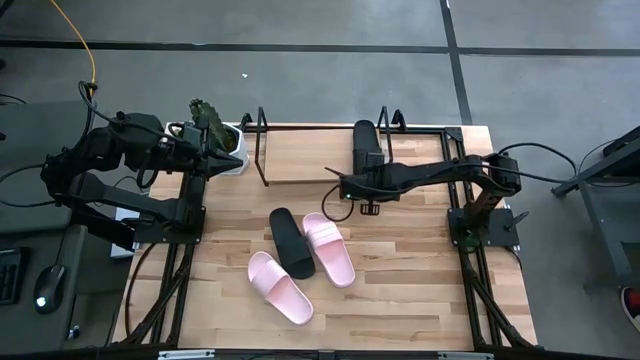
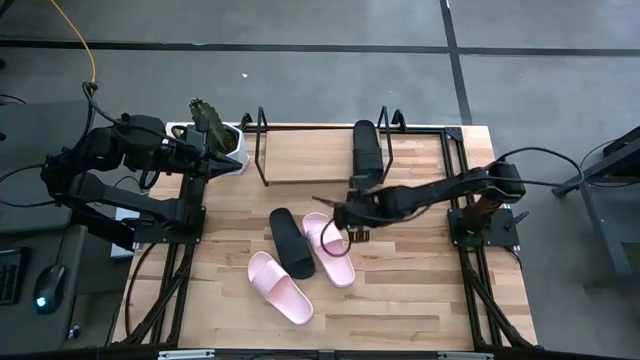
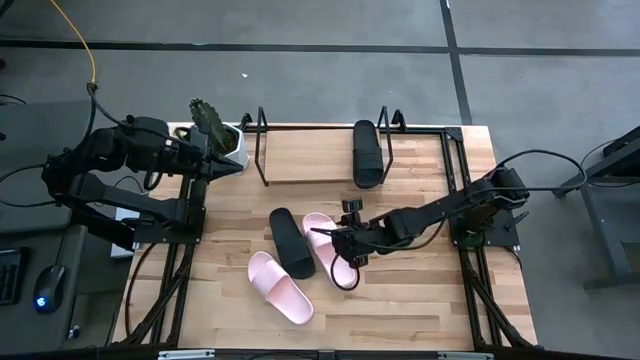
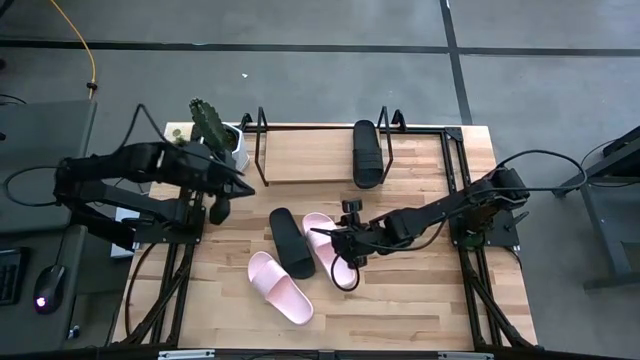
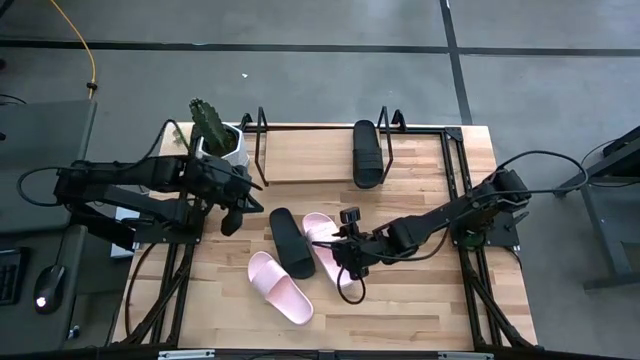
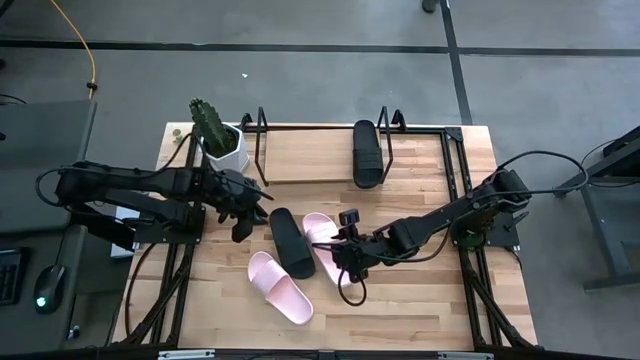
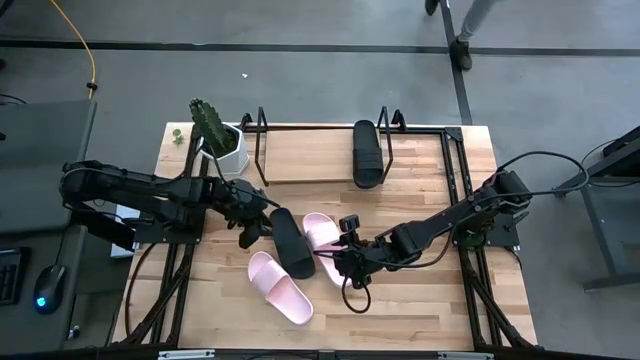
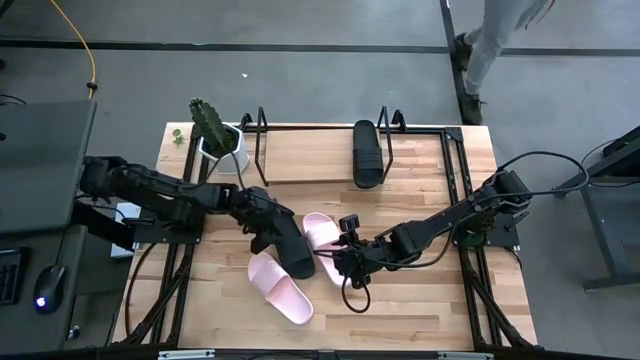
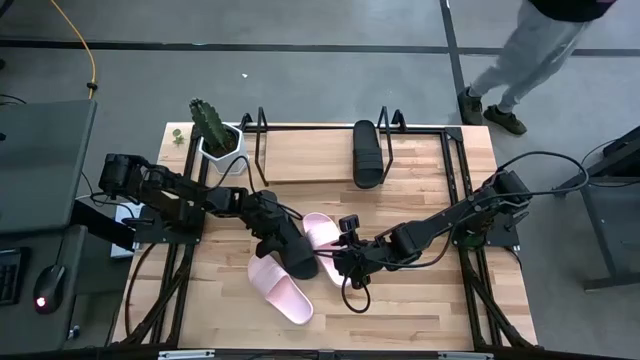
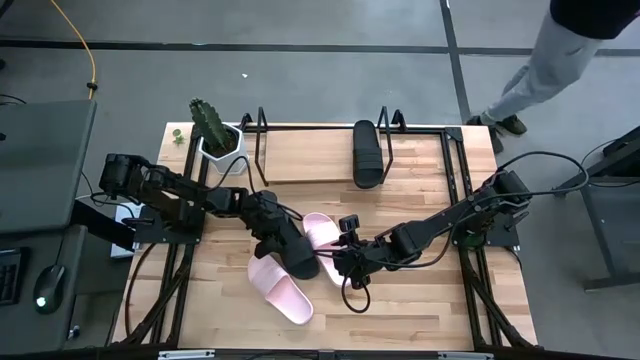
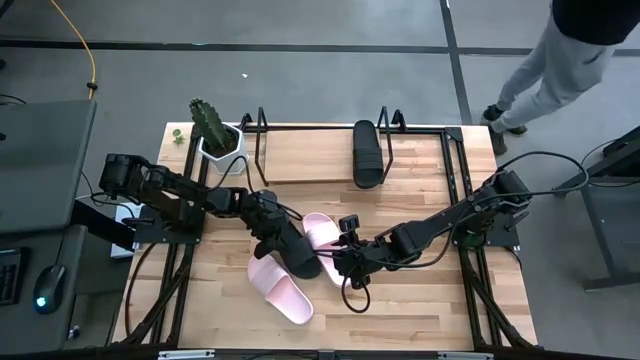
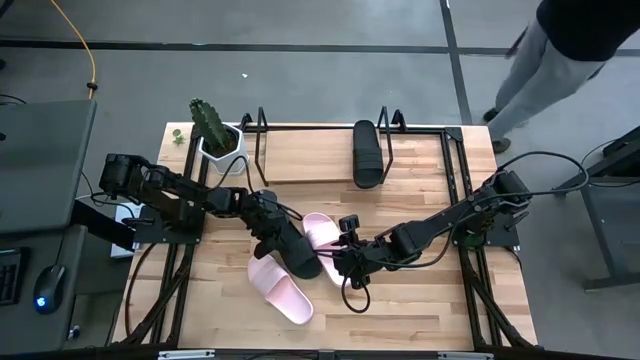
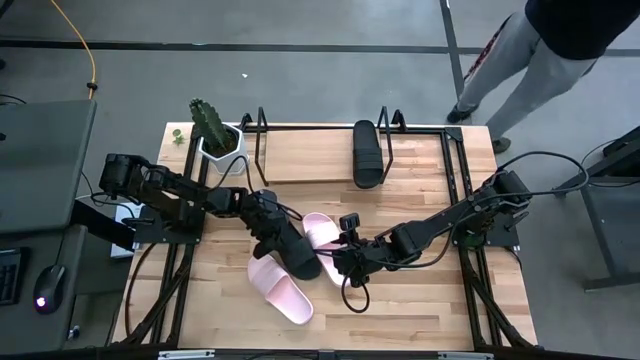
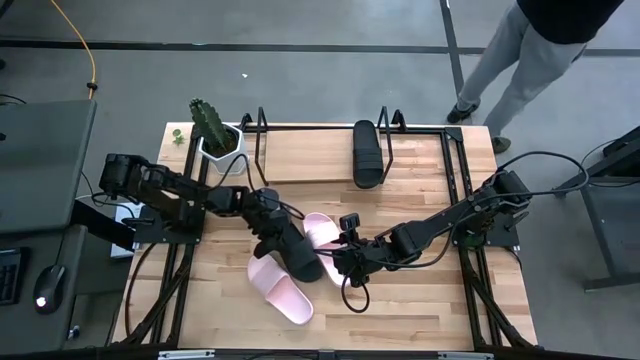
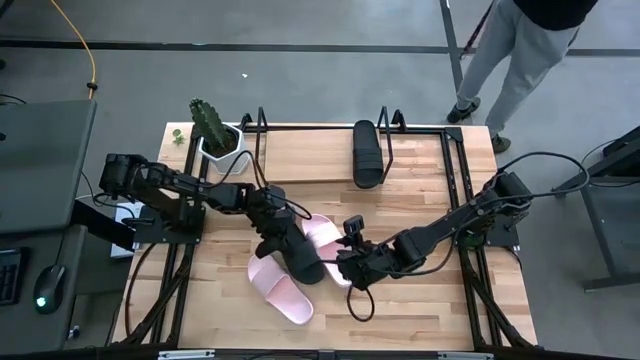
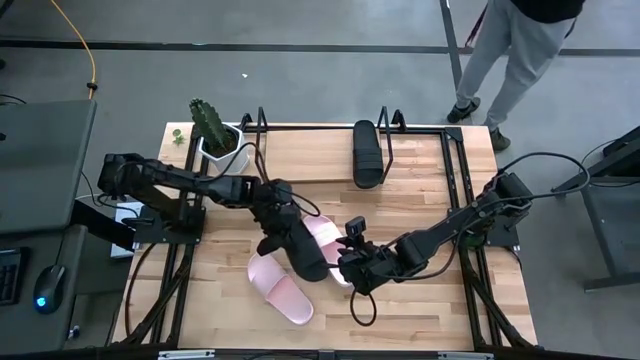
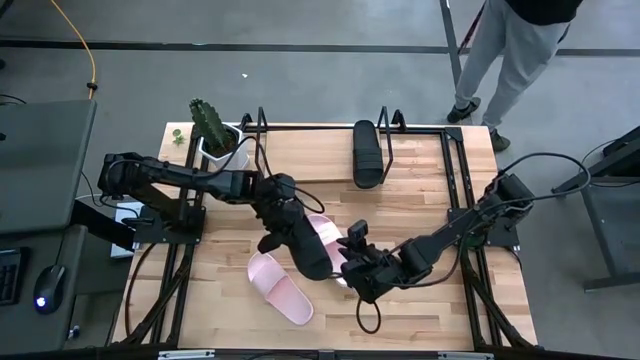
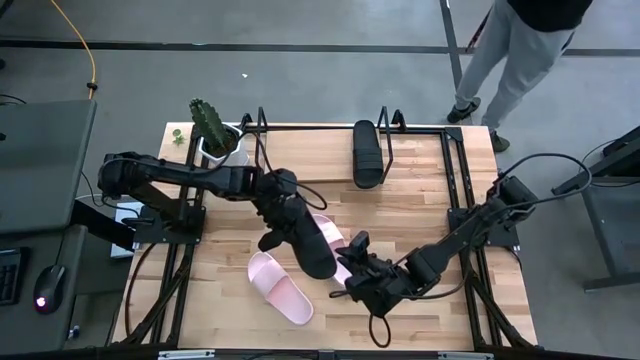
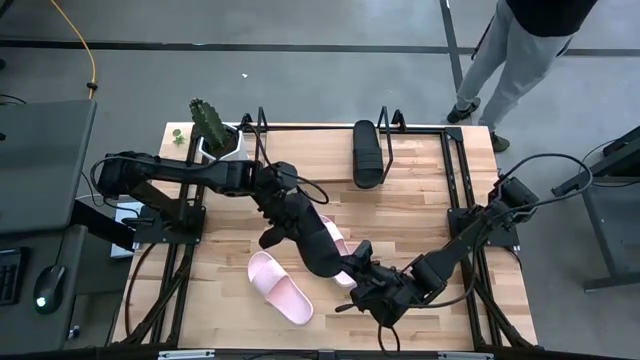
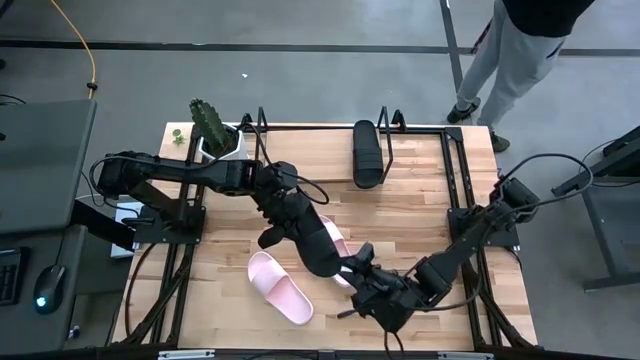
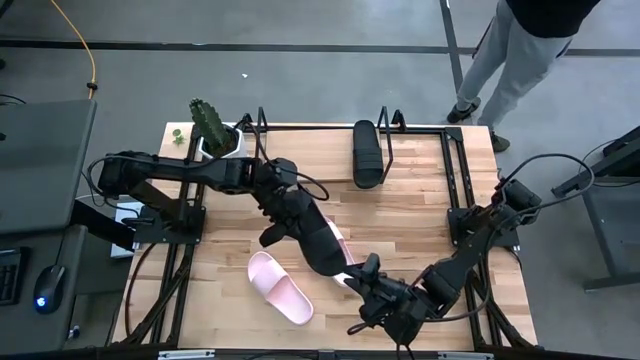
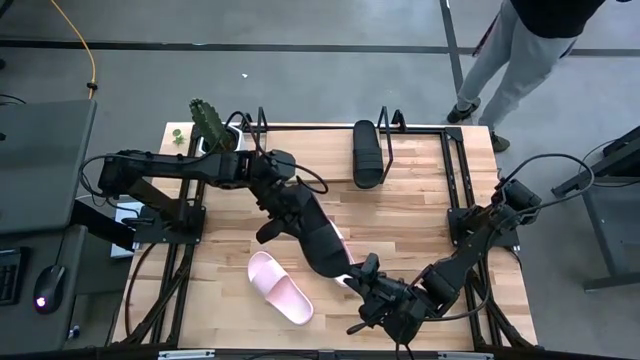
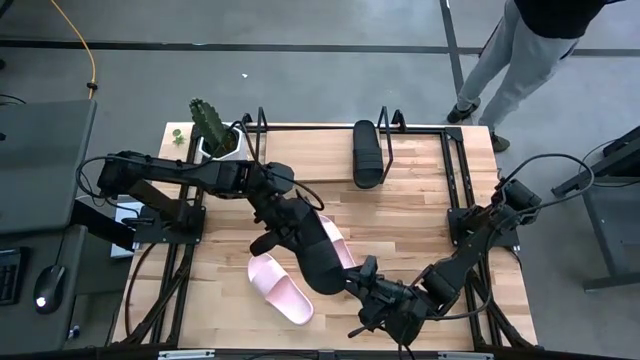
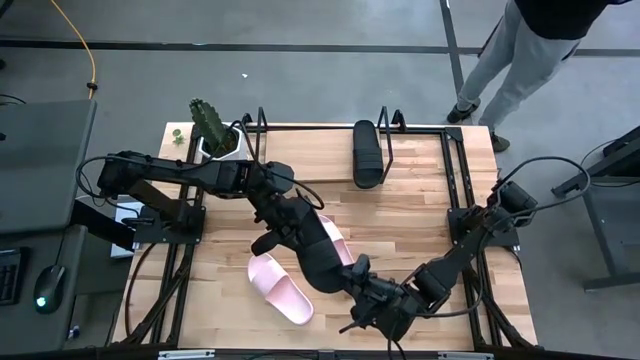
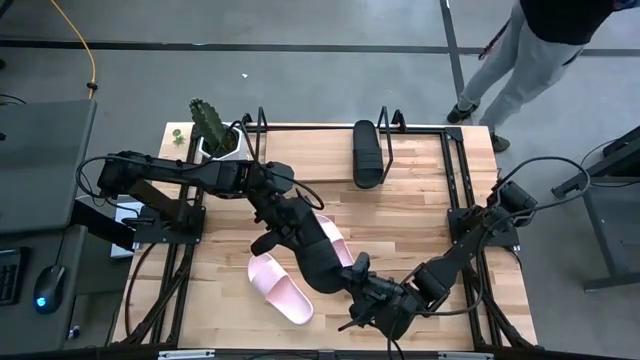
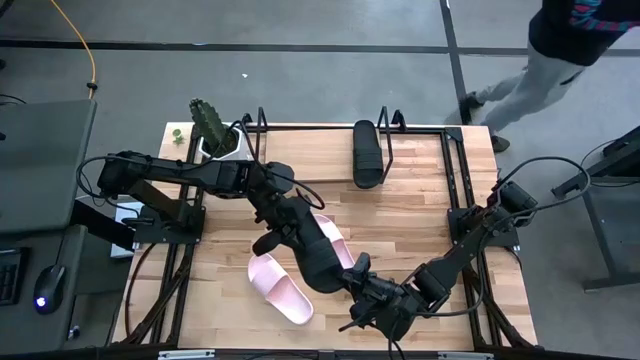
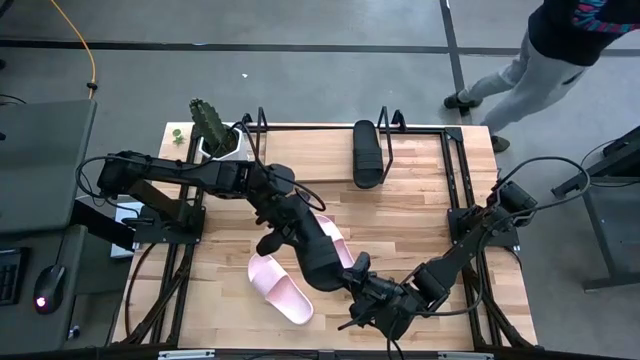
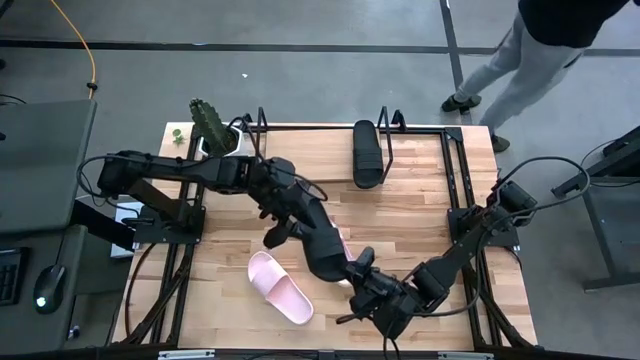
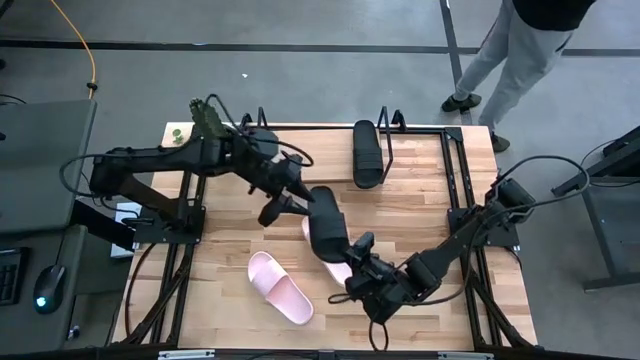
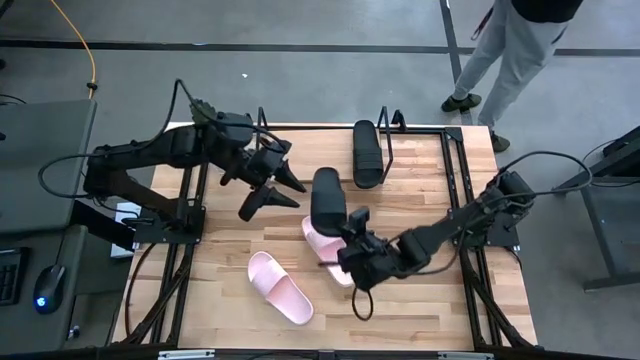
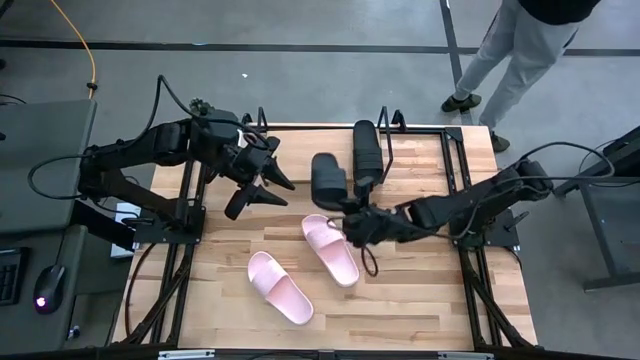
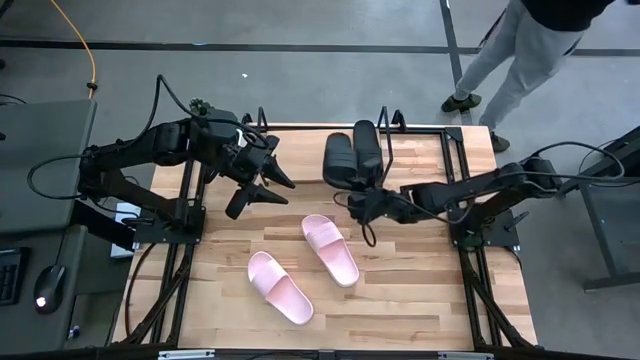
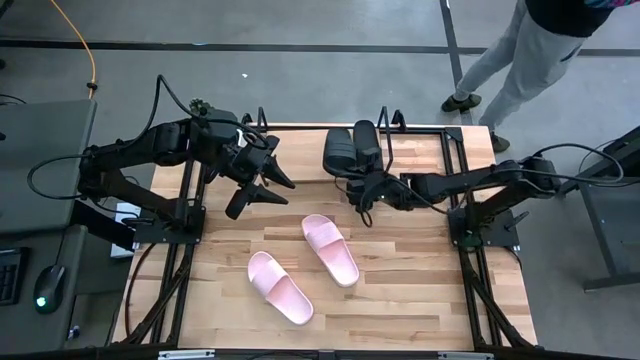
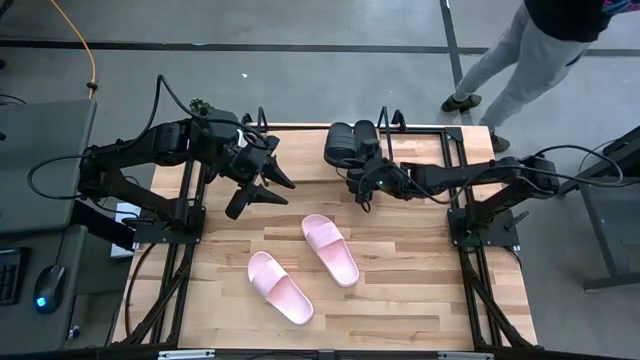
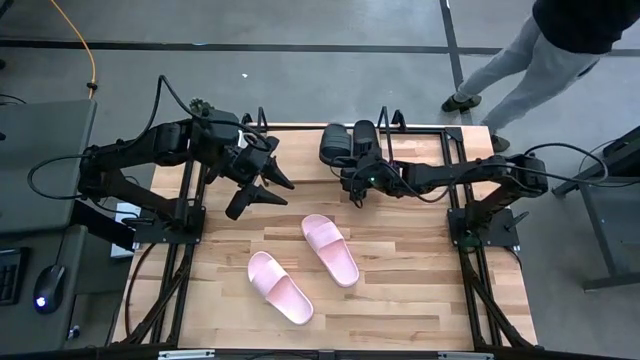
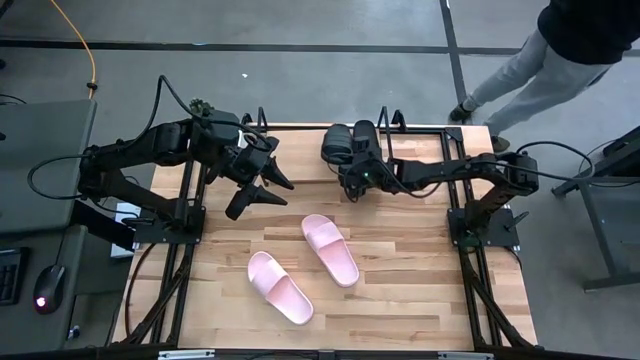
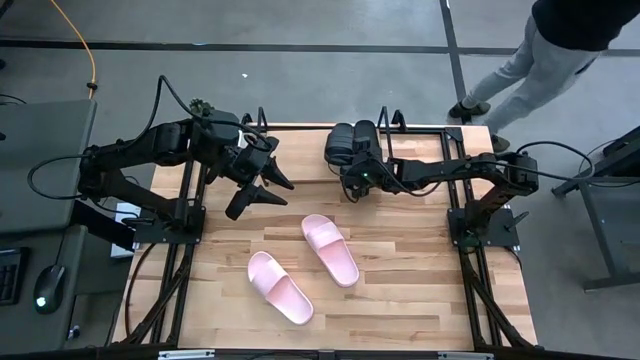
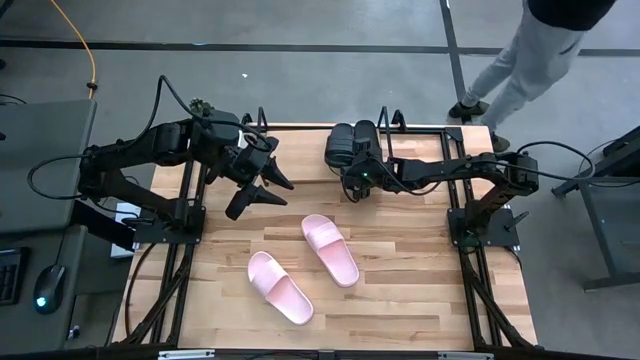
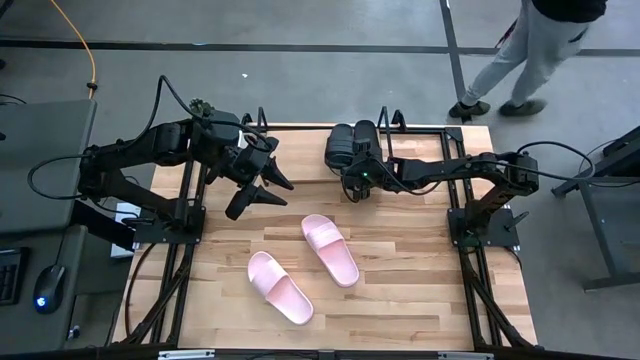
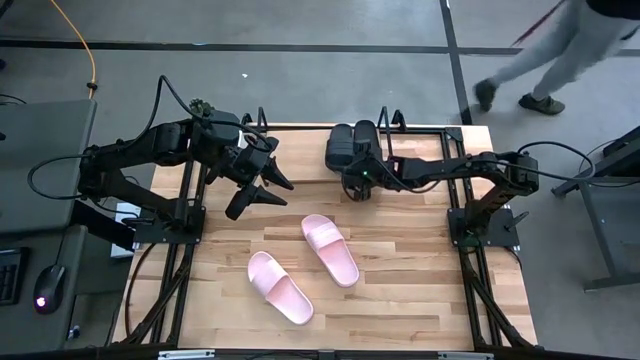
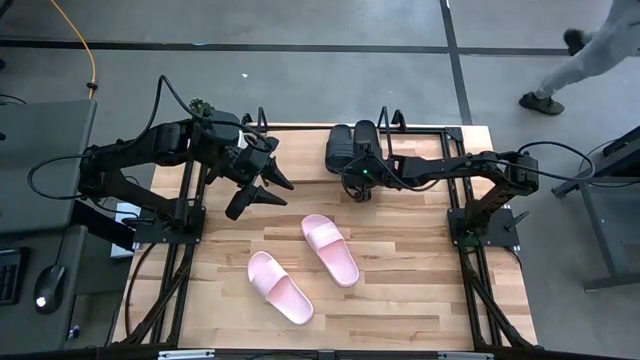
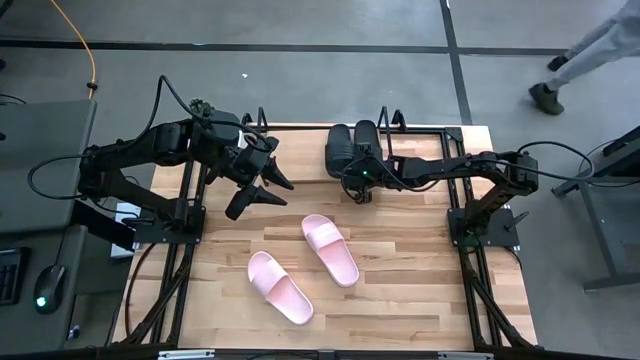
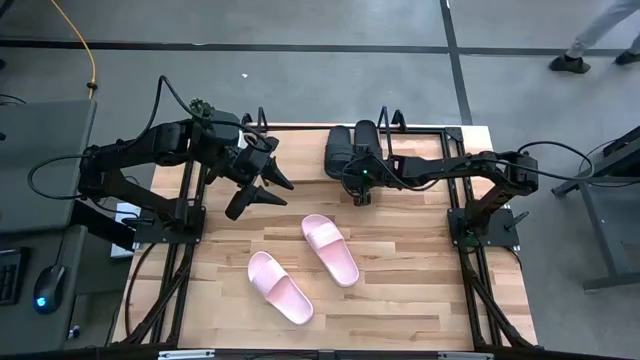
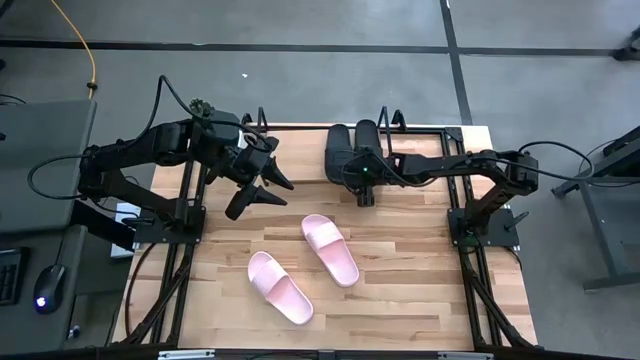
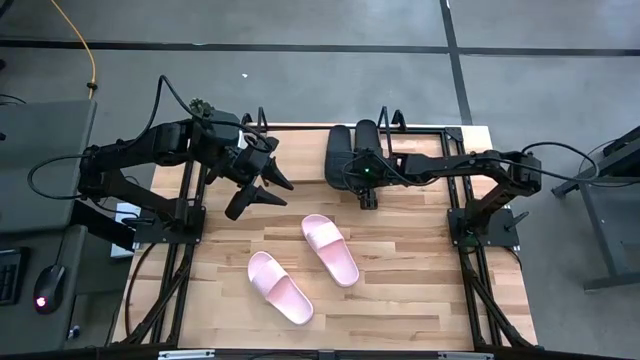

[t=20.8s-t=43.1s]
Task: Pick and place slides into the shelf
Put the black slides on the shelf
